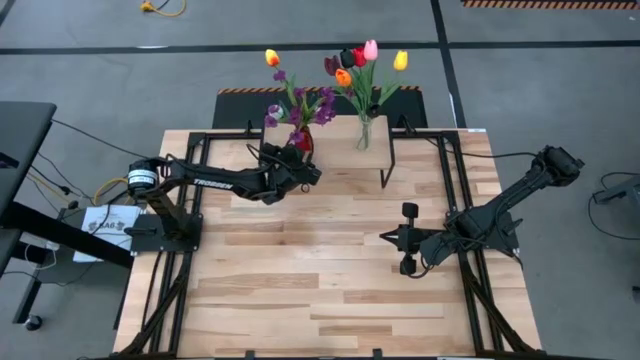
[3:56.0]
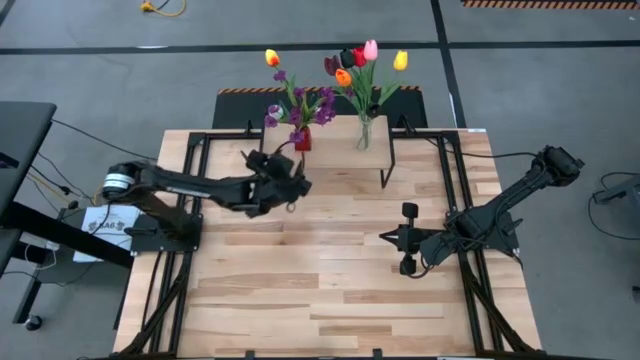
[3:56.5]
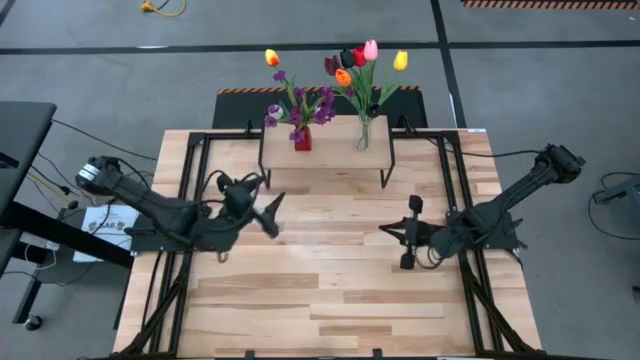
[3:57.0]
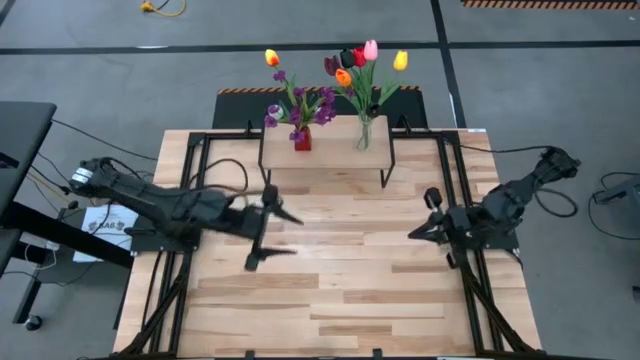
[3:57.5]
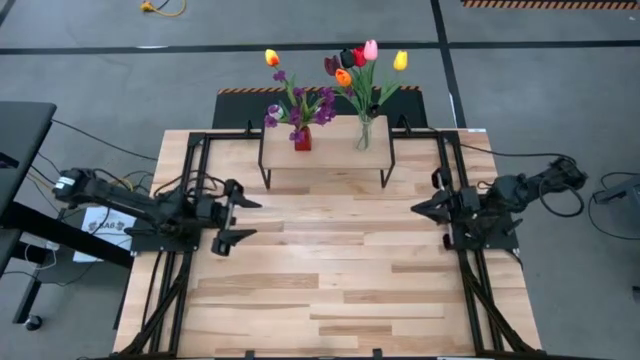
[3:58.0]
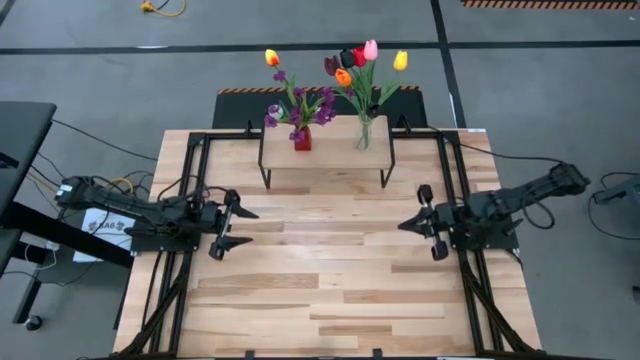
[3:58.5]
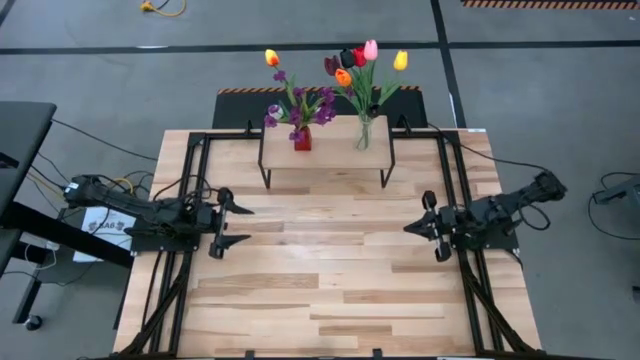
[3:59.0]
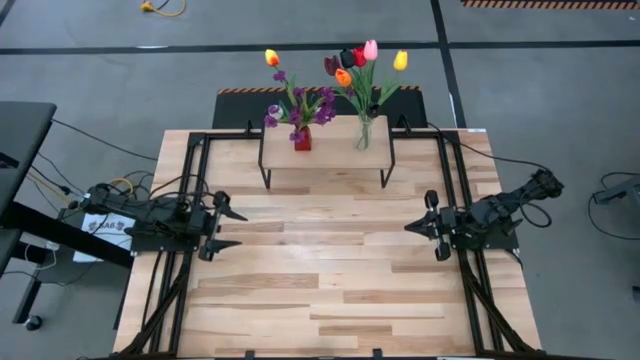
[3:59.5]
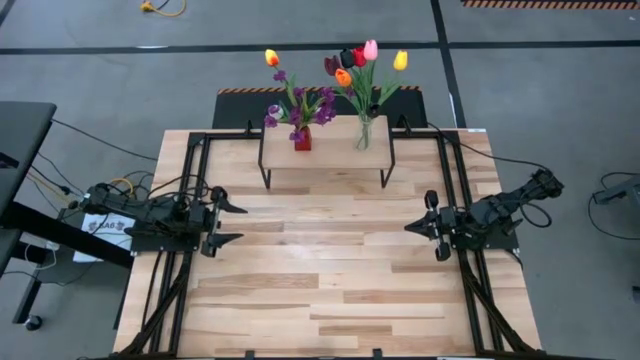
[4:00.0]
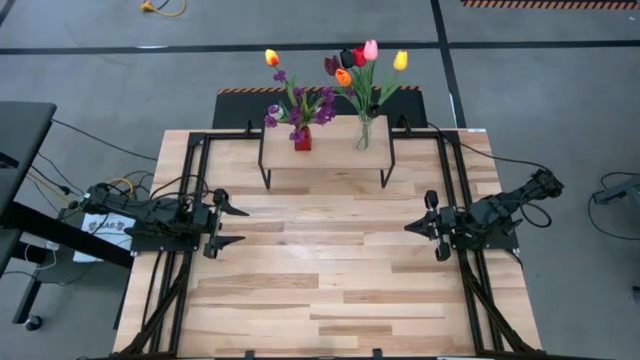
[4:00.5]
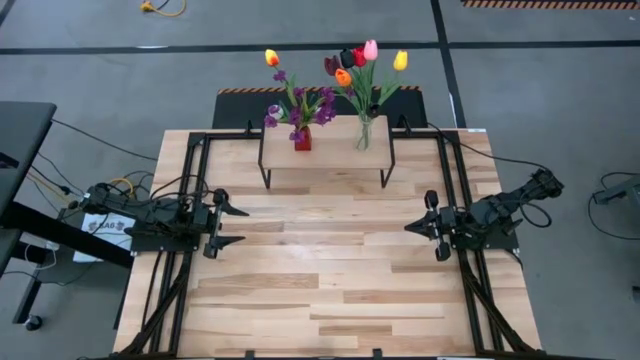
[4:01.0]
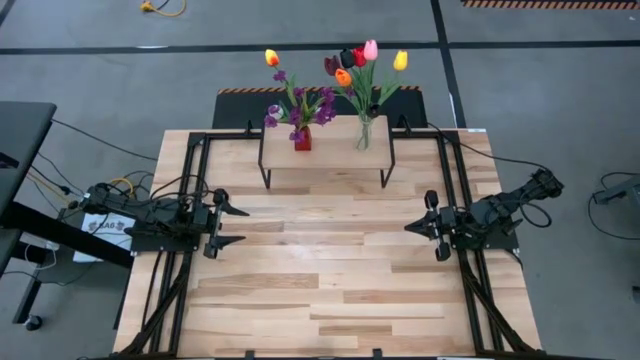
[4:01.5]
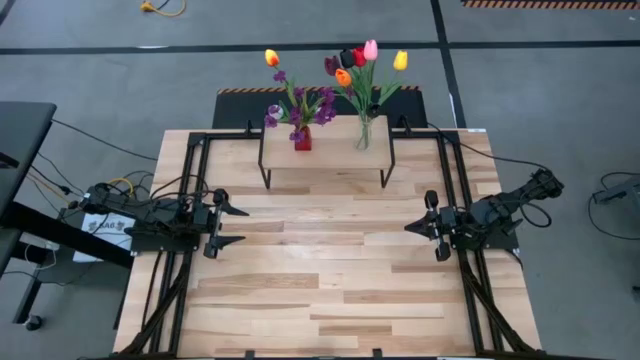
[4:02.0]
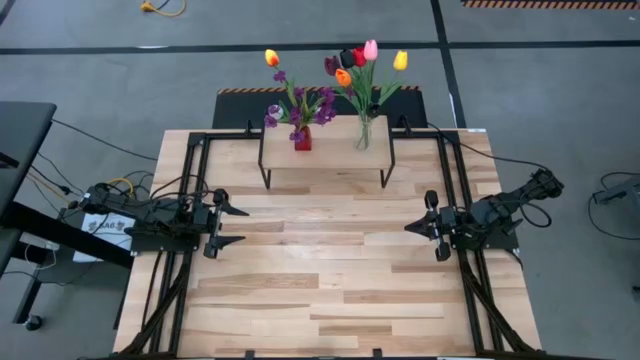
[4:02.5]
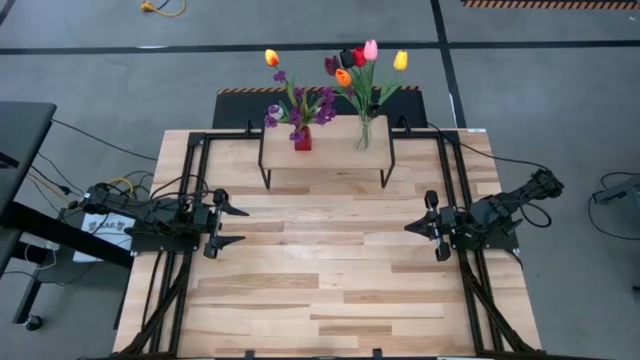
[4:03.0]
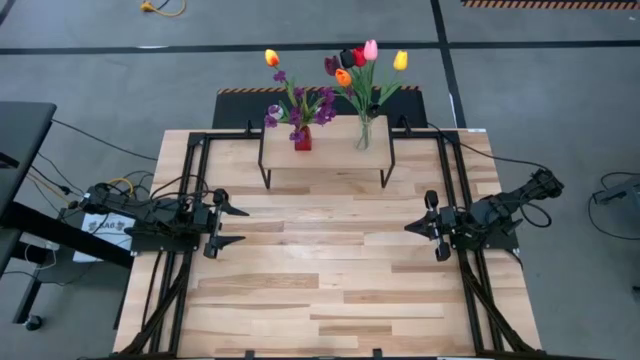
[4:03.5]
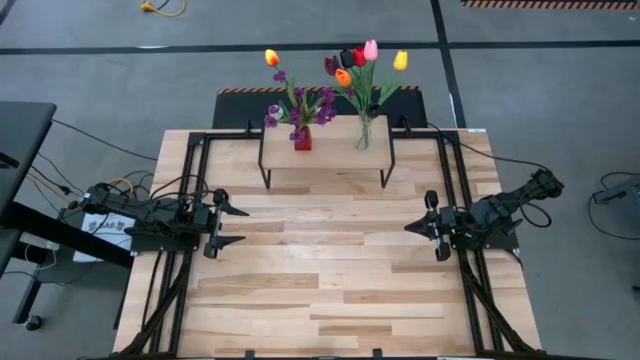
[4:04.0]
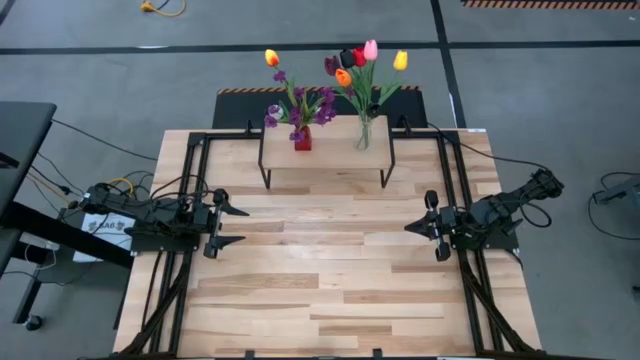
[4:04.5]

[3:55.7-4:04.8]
Task: Pick and place flowers into a vace then onto a shelf
Return to Home Position

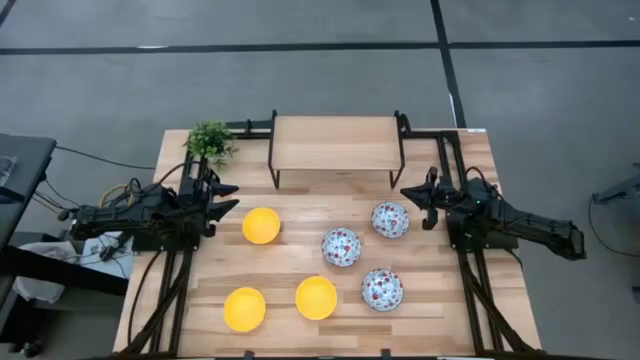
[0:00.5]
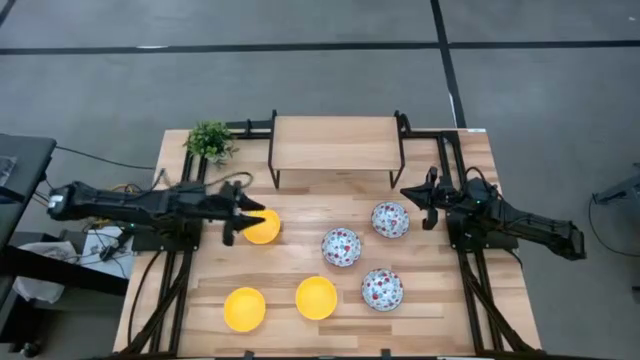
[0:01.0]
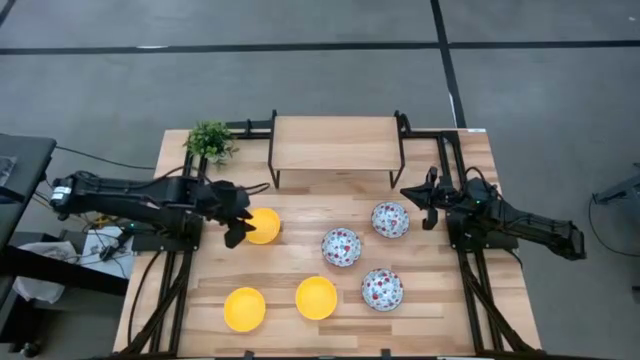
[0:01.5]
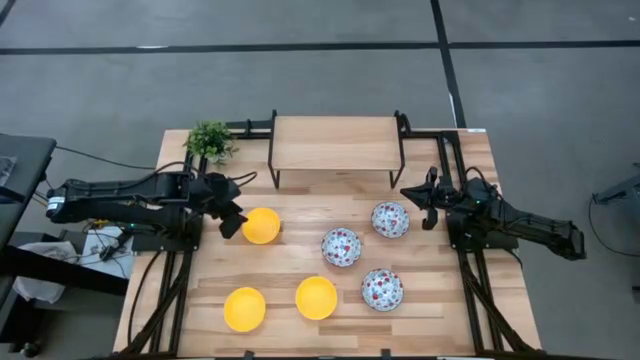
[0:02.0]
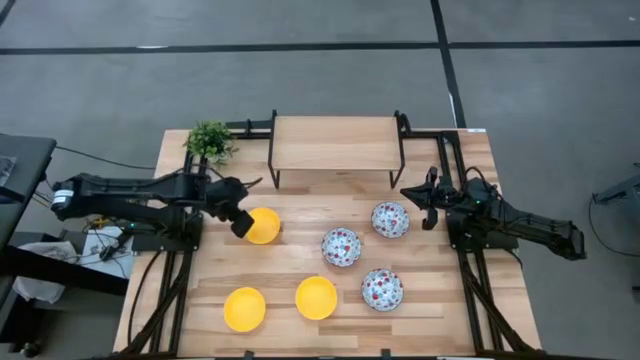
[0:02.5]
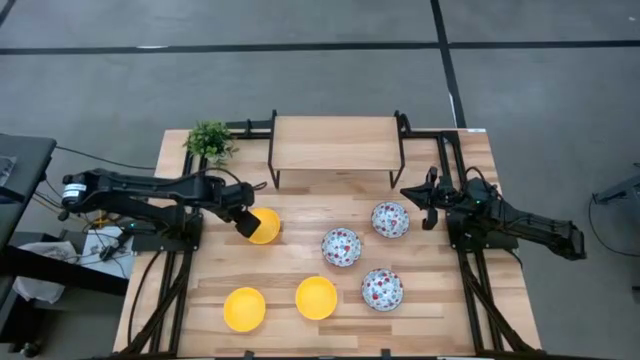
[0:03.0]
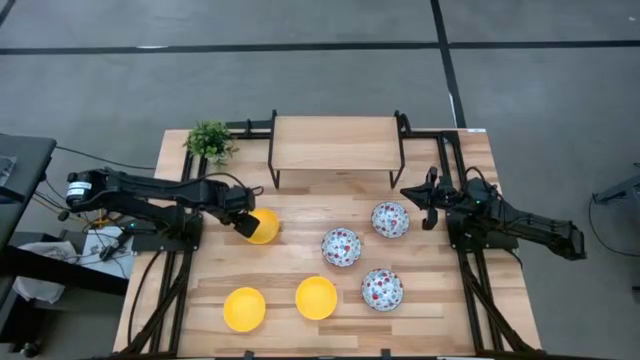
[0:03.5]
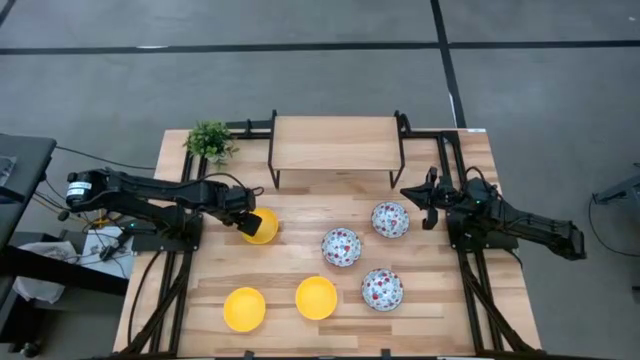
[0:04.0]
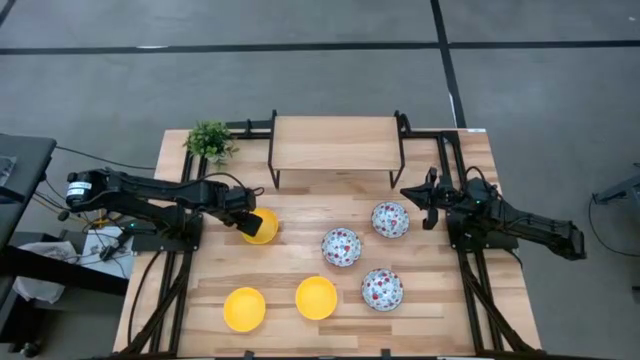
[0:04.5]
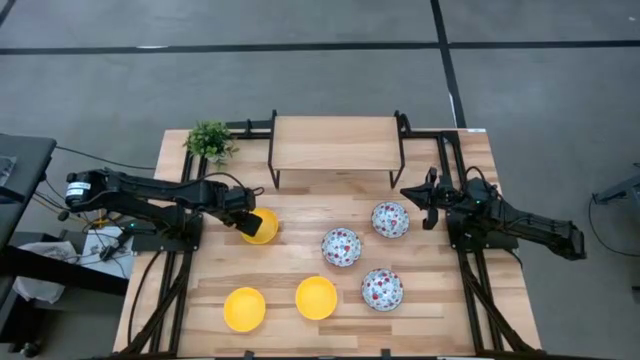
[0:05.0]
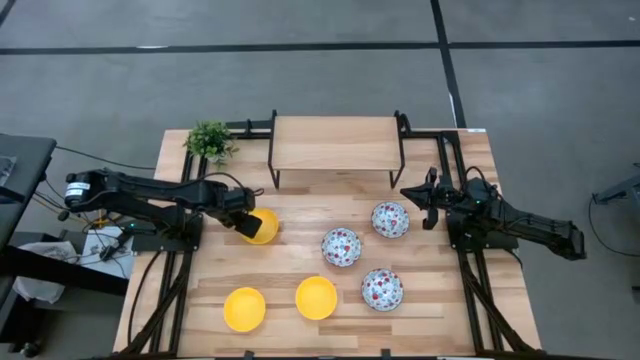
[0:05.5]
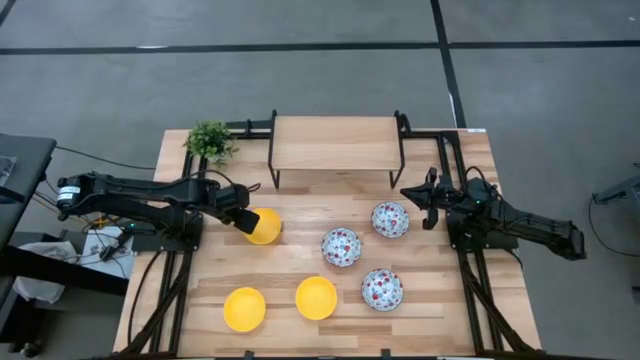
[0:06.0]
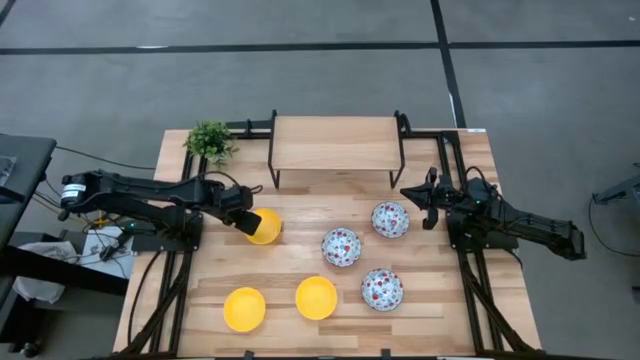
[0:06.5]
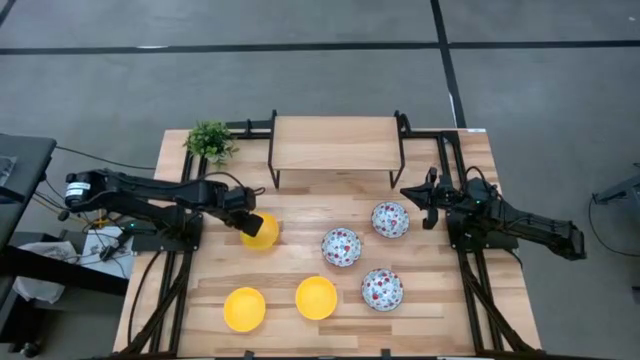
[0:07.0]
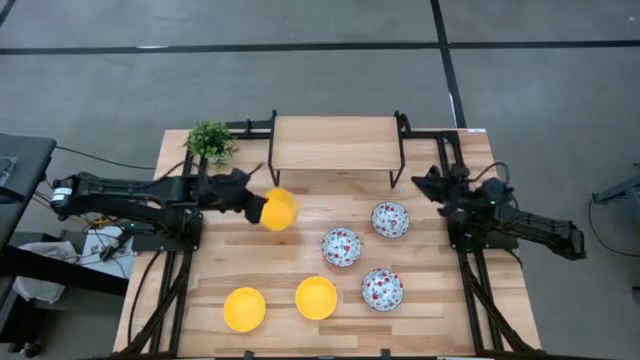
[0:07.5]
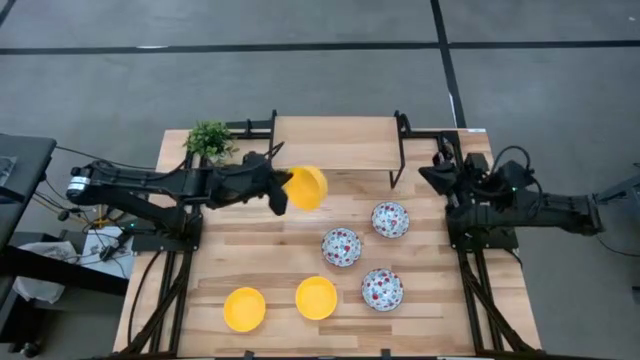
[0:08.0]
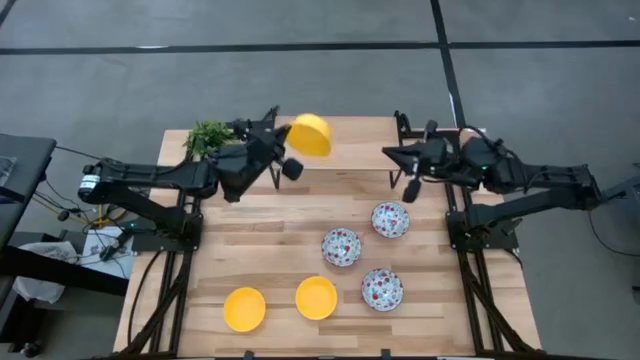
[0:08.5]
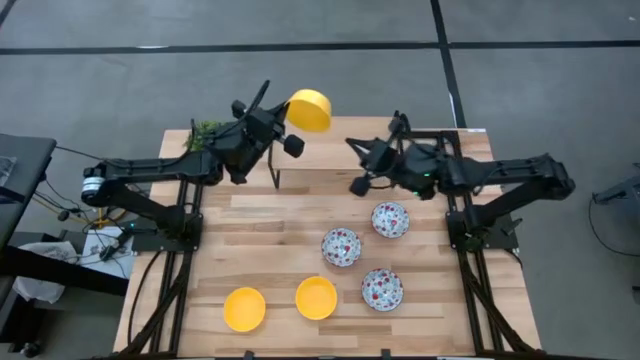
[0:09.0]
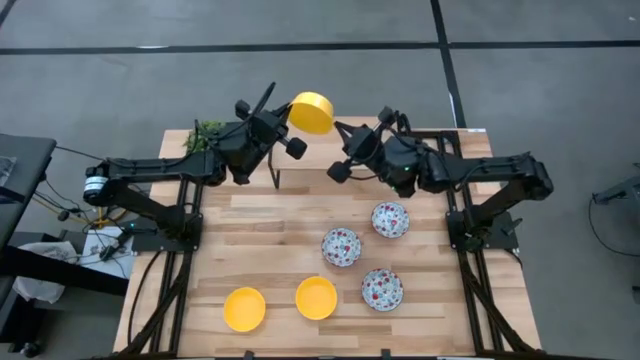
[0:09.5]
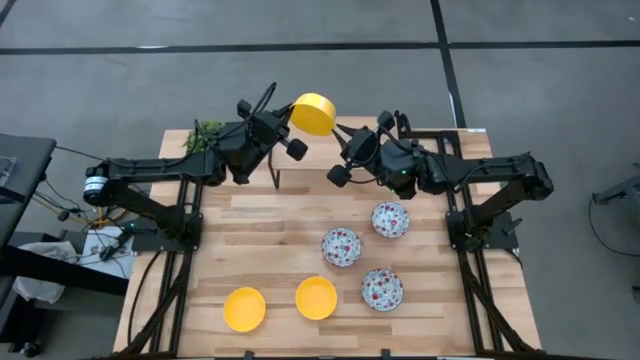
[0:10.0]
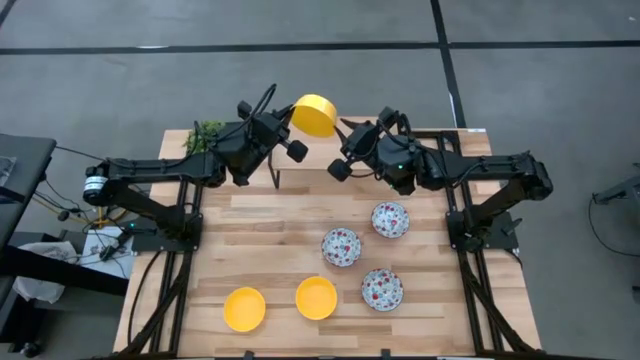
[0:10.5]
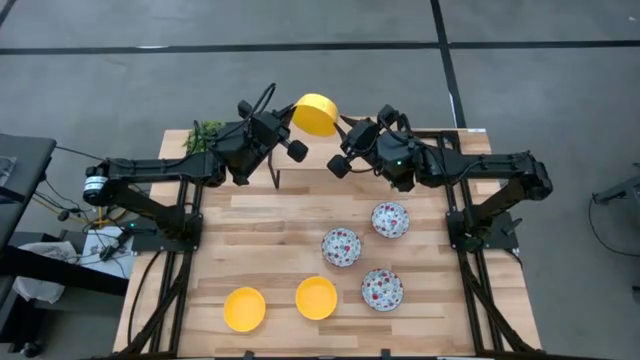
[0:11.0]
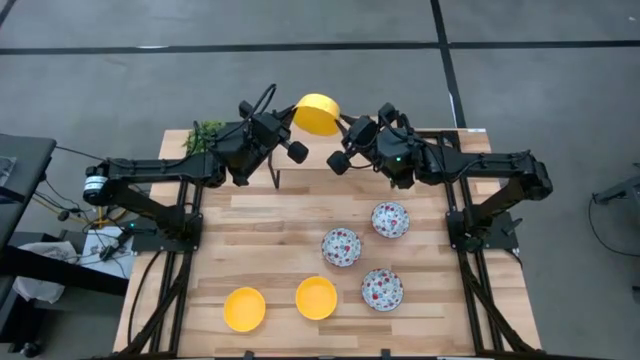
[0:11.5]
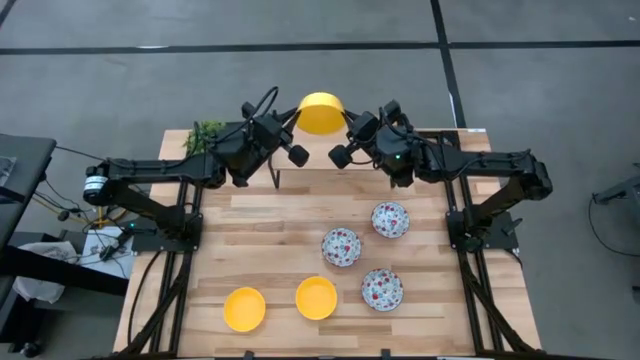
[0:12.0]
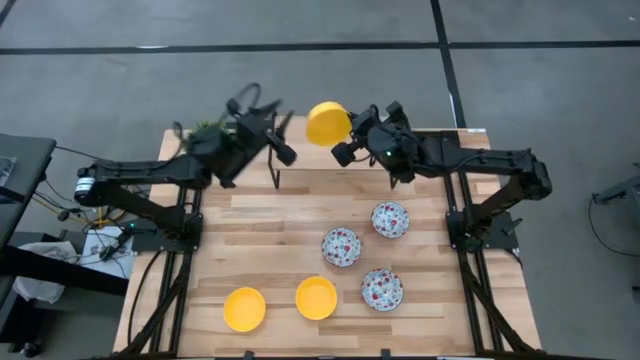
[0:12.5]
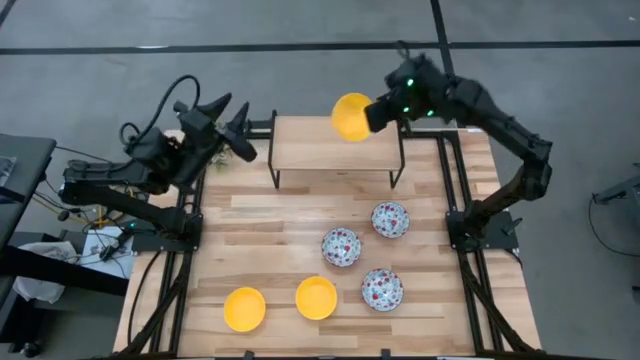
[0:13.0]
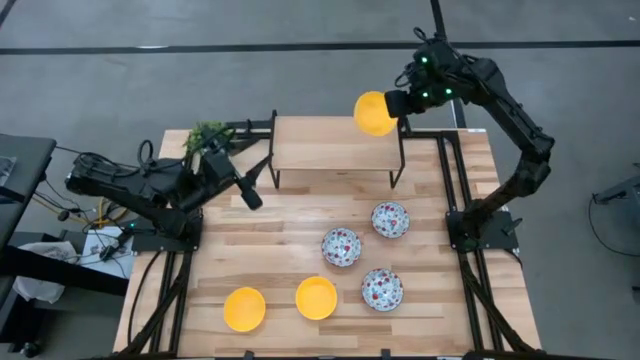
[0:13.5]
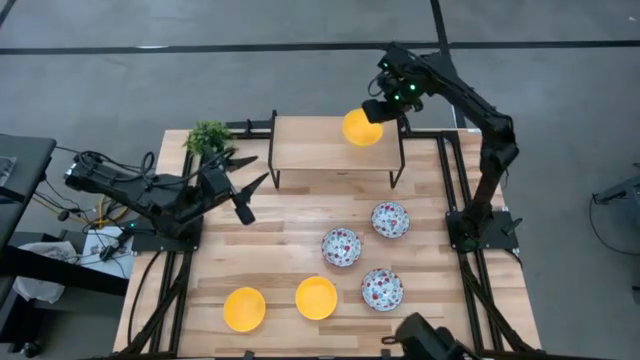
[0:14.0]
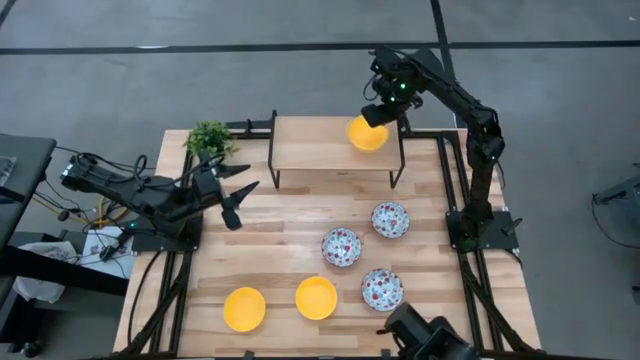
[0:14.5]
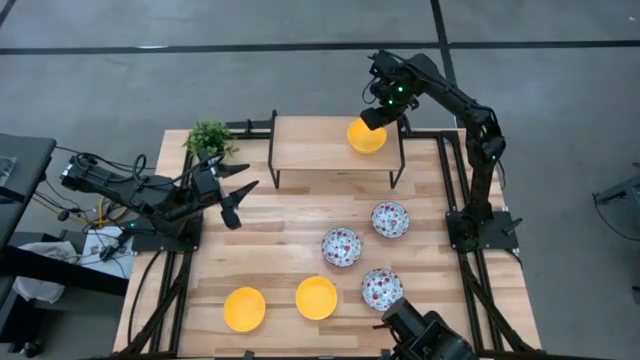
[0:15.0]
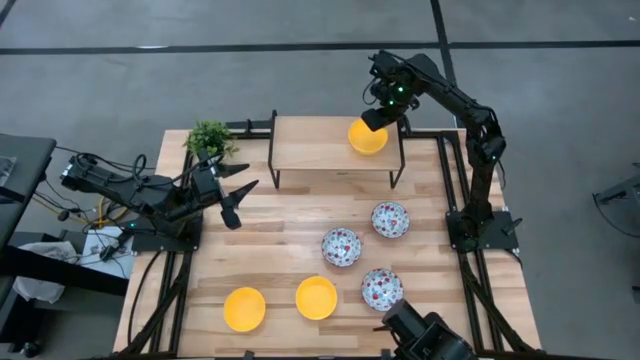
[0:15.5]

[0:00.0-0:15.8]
Task: Pick & Place Mini bowls
Put the top yellow bowl on the shelf
